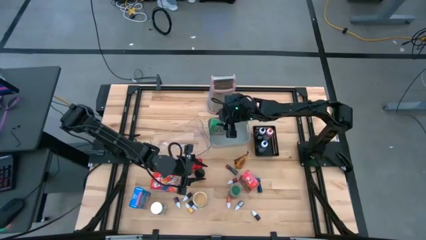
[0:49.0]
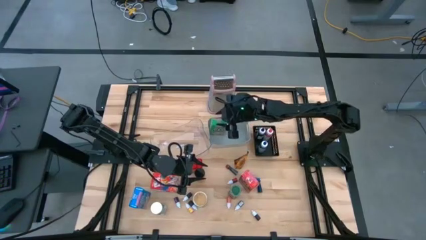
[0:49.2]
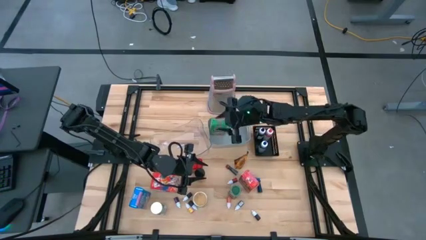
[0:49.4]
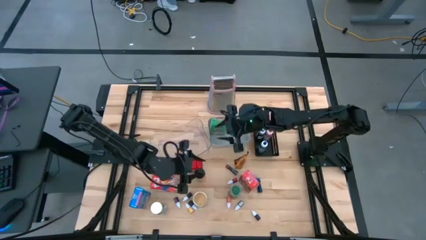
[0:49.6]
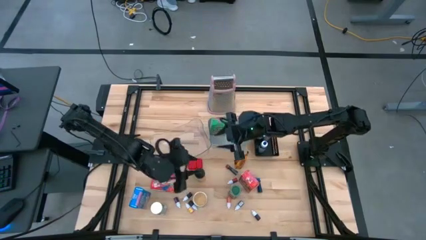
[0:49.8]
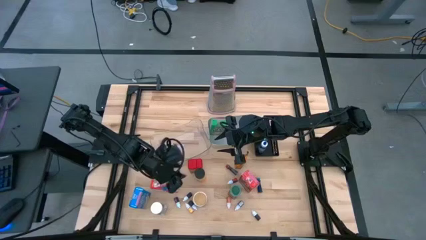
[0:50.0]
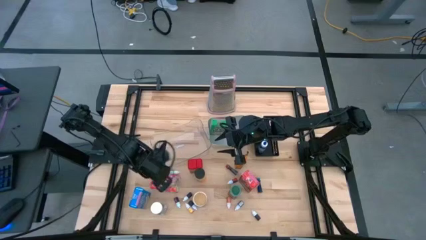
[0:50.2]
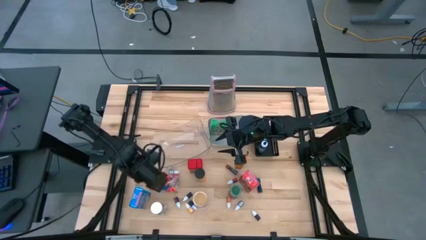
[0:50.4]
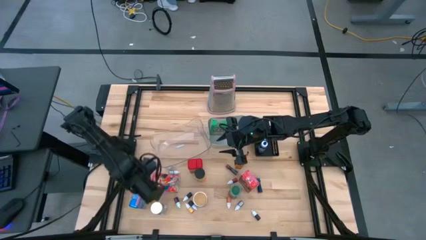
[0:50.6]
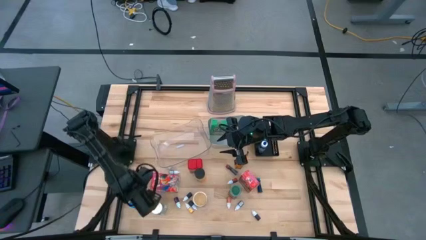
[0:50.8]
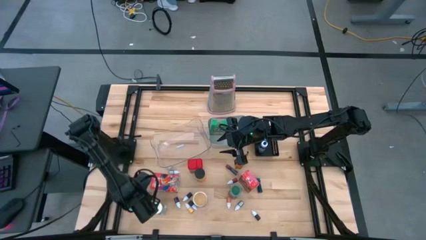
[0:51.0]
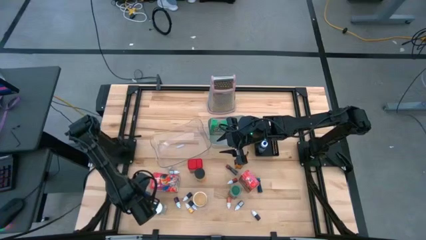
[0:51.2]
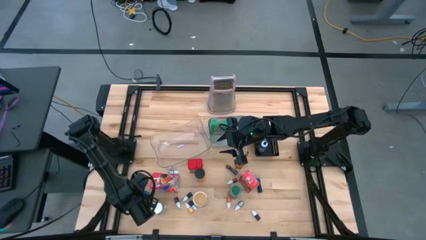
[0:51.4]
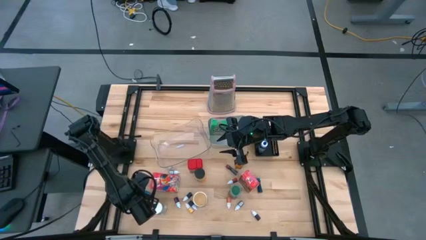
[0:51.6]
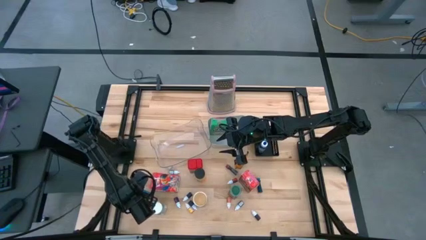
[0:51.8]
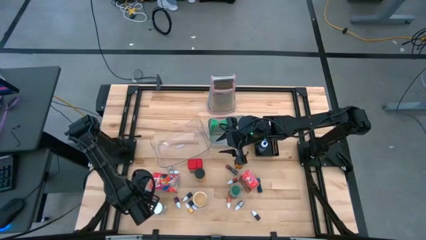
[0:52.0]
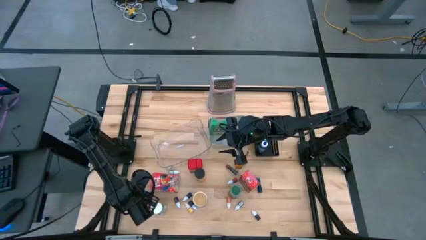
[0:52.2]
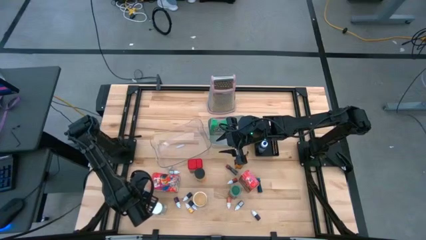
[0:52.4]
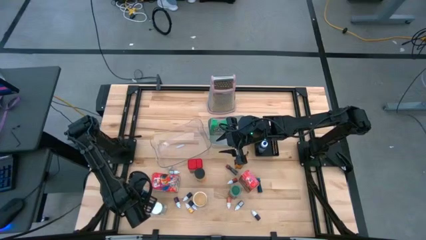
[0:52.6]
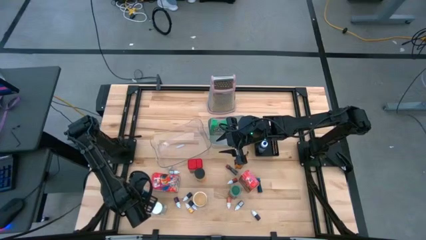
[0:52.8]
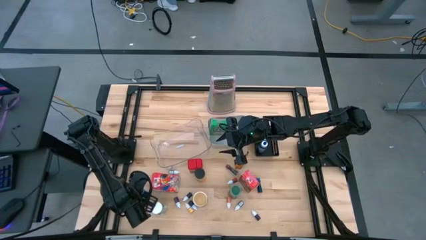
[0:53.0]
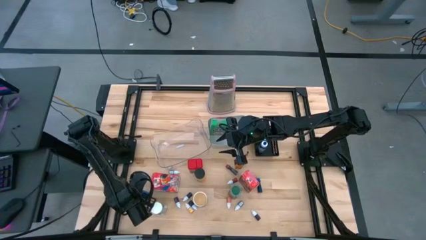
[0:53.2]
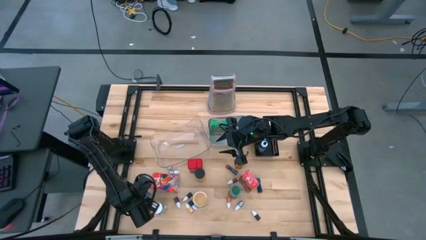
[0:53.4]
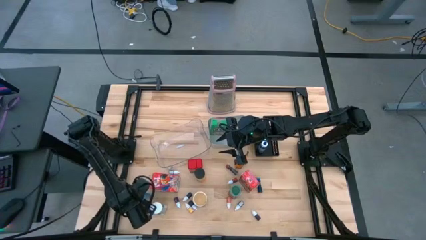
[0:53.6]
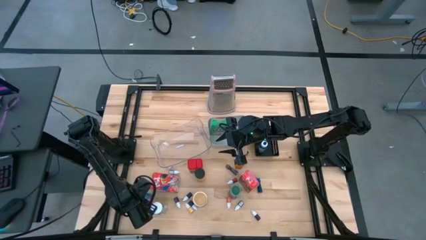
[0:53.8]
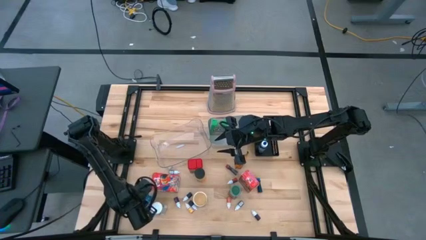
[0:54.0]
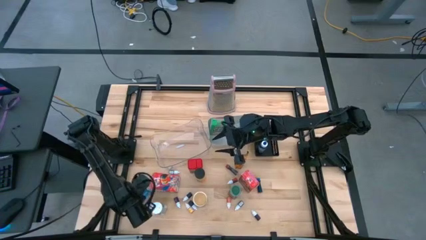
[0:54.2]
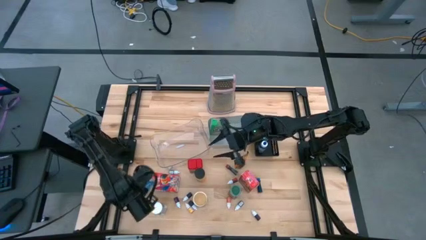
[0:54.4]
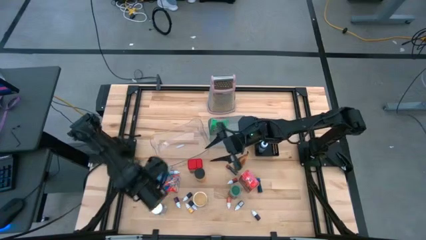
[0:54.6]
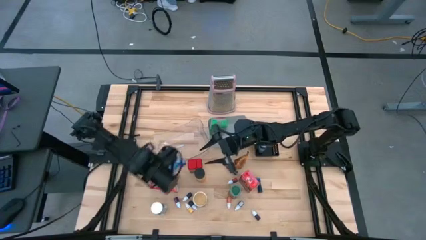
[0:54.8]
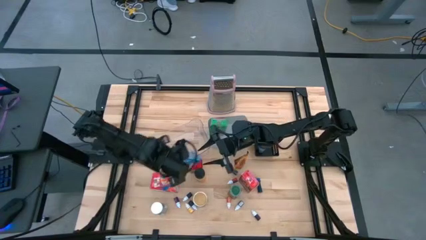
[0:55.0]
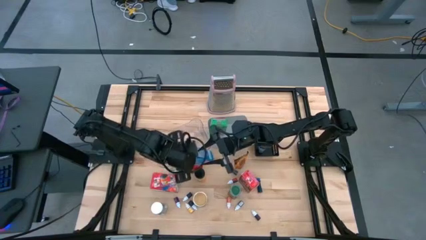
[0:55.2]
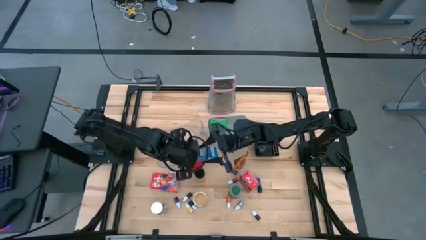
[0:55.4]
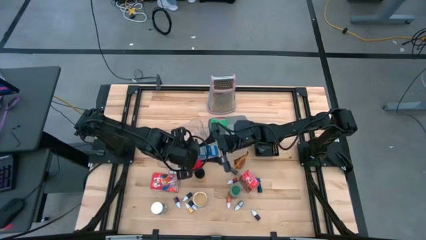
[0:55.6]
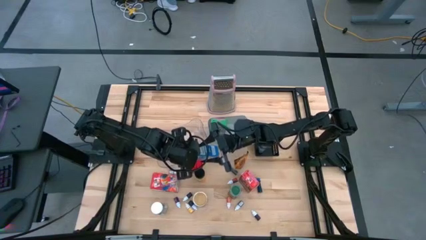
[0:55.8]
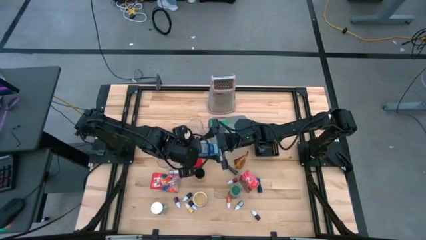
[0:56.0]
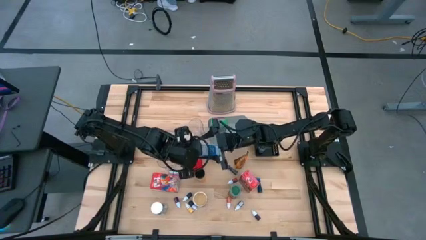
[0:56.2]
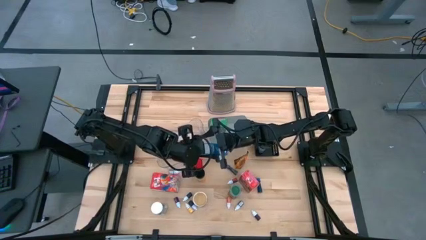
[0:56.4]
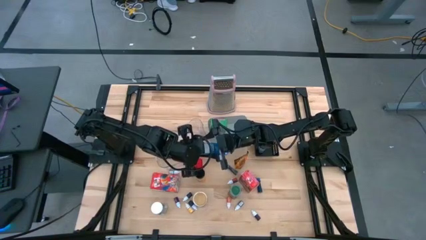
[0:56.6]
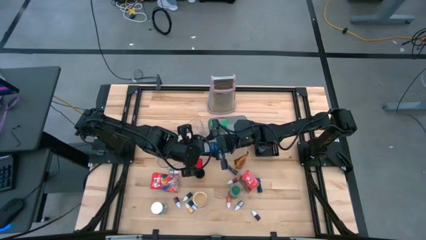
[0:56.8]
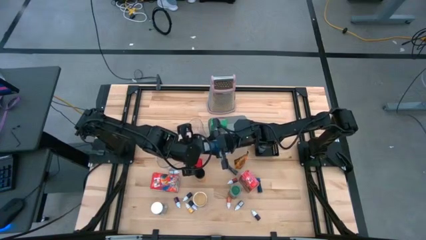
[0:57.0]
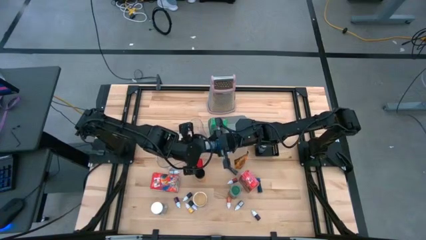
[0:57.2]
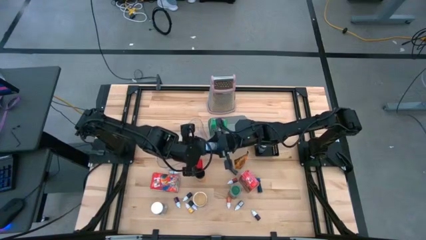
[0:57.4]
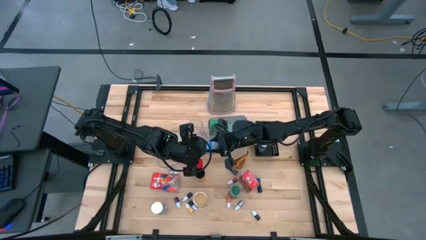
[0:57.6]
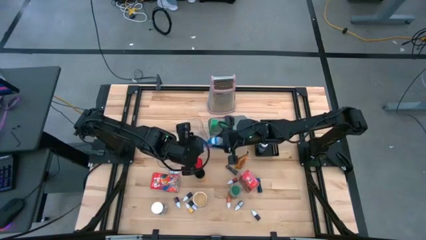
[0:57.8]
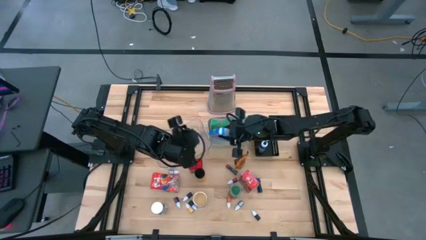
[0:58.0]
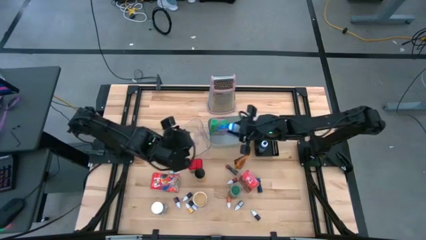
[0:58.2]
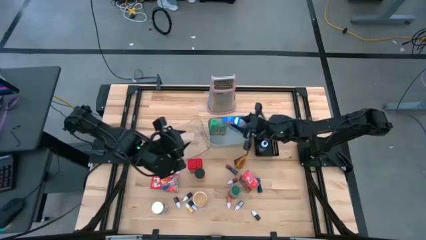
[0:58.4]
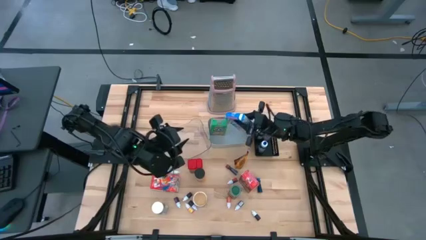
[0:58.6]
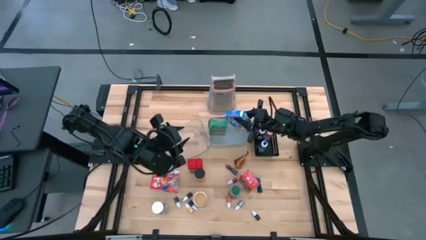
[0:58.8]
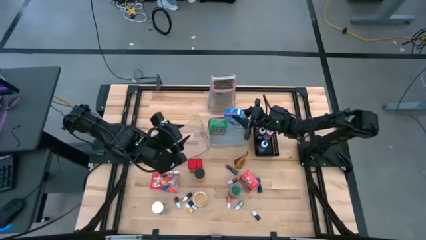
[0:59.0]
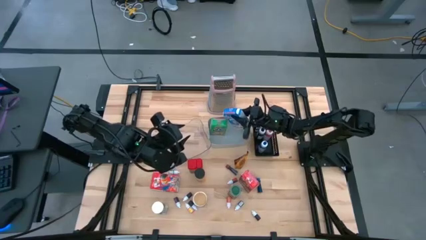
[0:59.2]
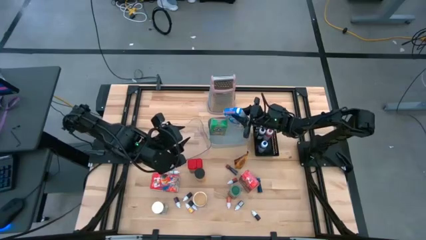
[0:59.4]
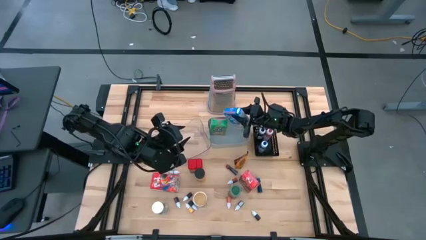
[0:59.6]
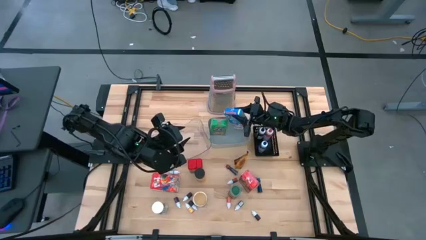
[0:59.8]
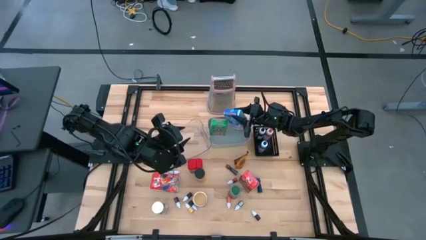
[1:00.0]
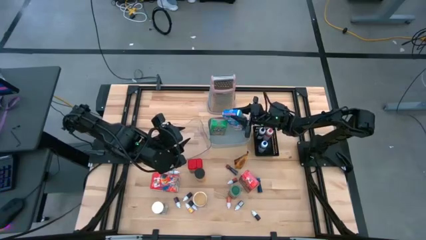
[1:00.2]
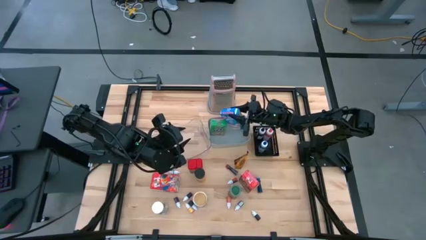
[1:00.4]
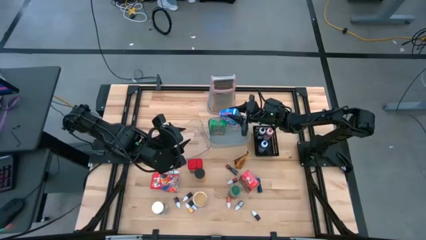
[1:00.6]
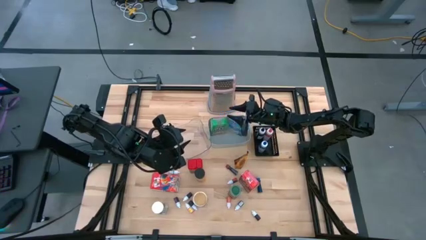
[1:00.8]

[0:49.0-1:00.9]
Task: Pick & Place Kitchen Items
Put the blue cereal box into the gray bin

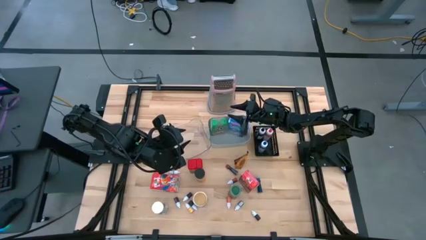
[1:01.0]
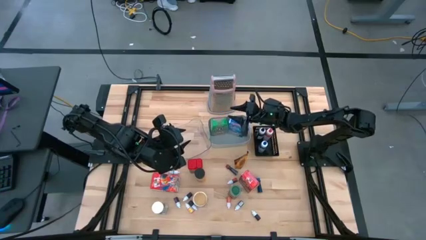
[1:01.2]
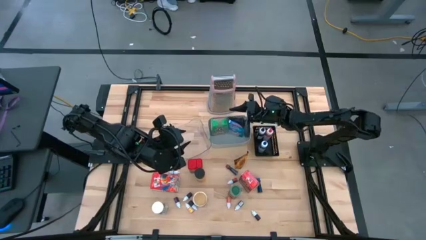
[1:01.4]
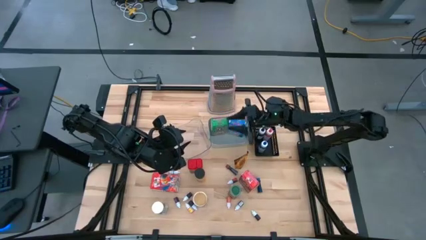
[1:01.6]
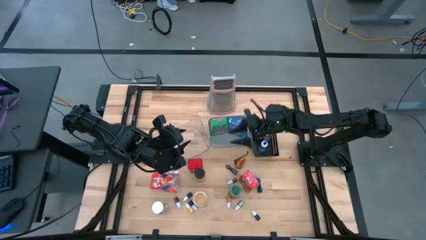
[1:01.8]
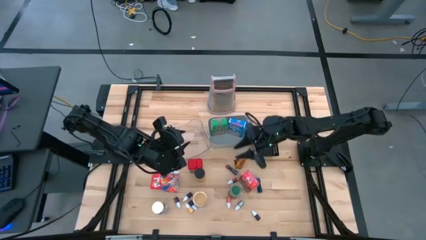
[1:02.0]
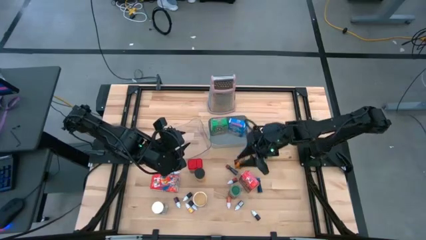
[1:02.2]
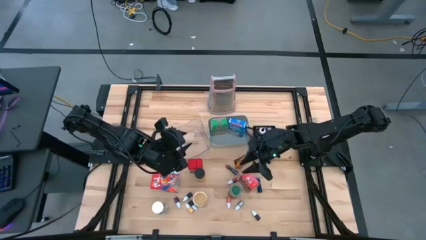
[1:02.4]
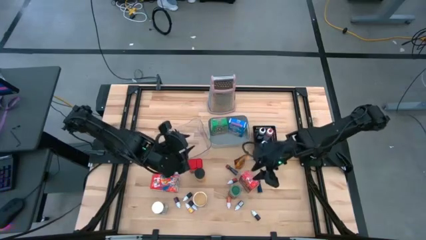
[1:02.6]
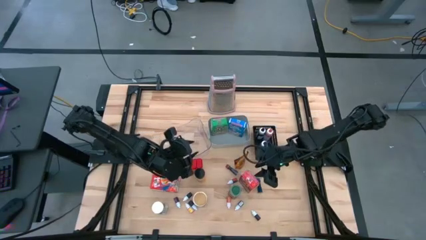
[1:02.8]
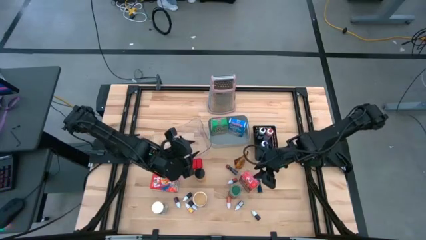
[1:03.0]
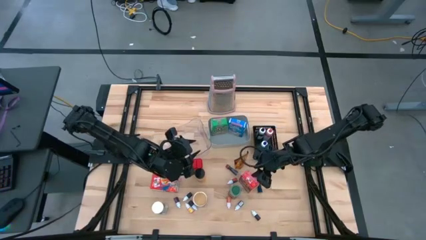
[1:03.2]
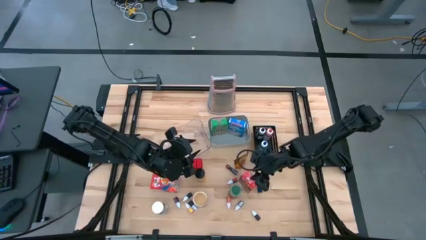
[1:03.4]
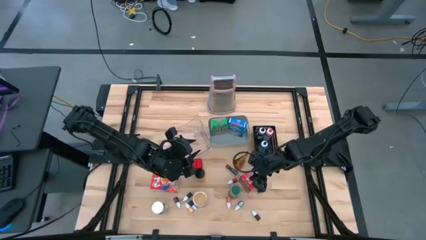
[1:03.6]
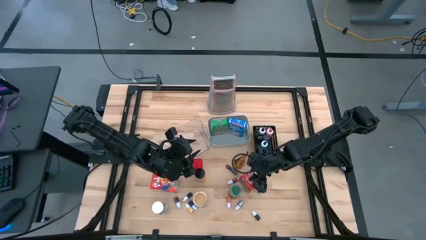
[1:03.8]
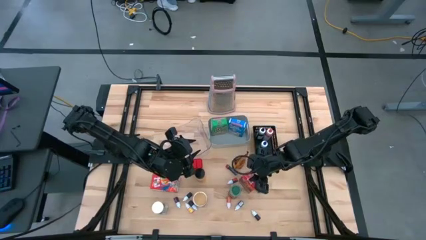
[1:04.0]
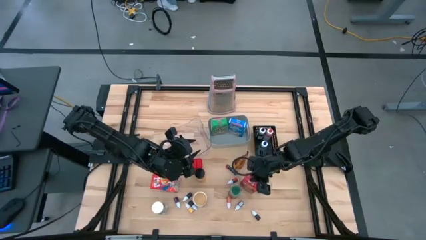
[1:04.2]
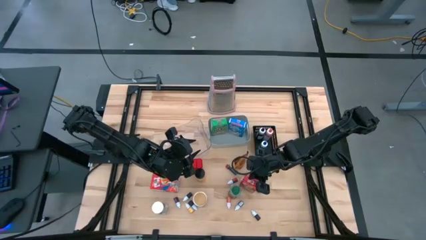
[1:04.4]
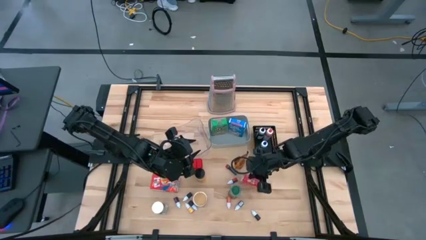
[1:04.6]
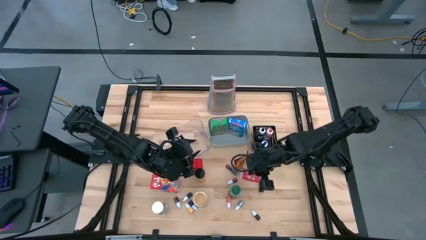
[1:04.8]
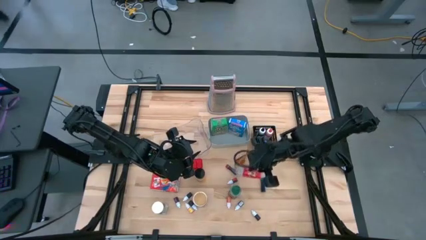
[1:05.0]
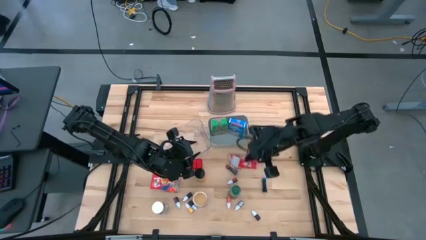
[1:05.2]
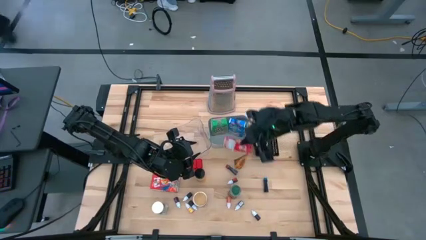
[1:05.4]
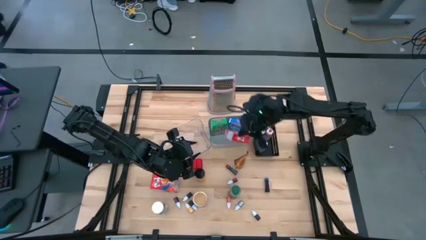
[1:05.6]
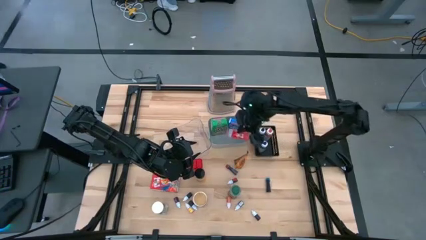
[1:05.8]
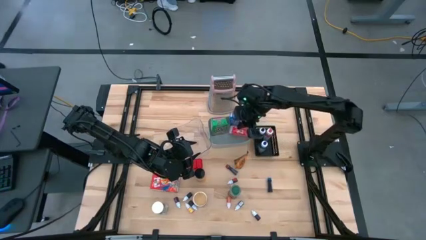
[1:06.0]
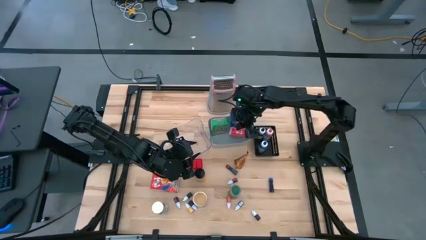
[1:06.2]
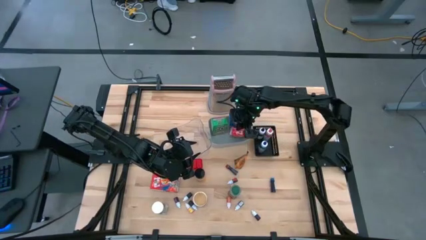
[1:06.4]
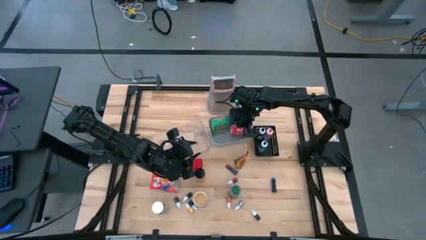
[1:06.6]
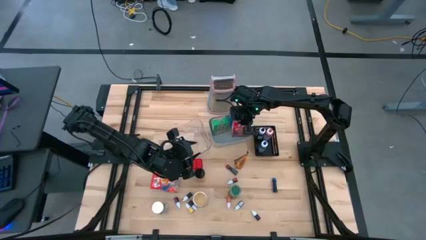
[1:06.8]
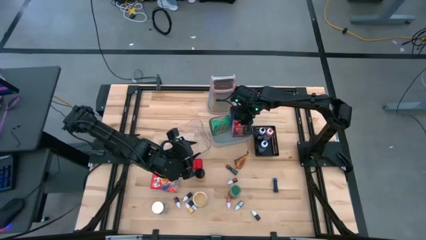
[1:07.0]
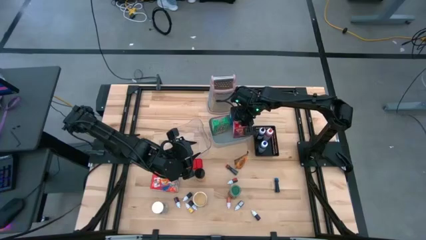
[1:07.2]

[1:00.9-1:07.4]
Put the right red cereal box into the gray bin
